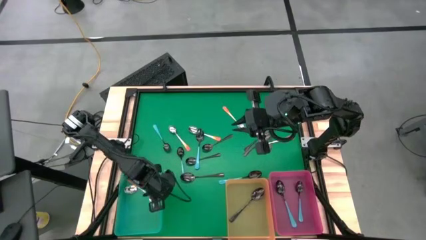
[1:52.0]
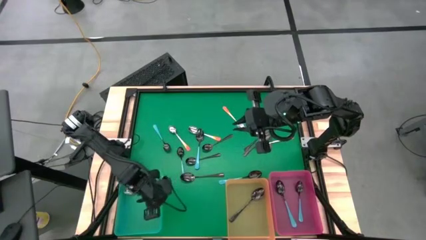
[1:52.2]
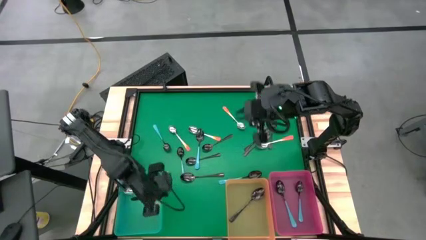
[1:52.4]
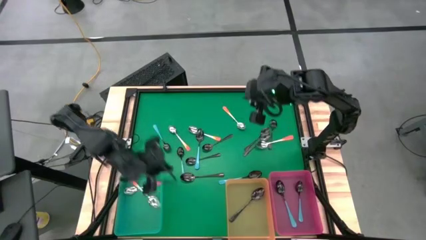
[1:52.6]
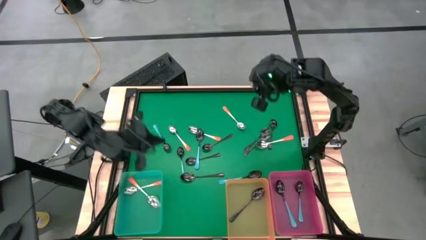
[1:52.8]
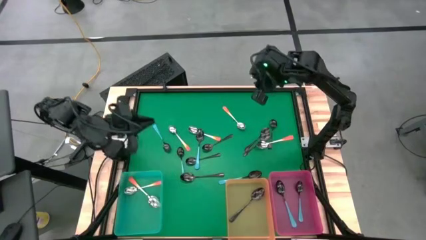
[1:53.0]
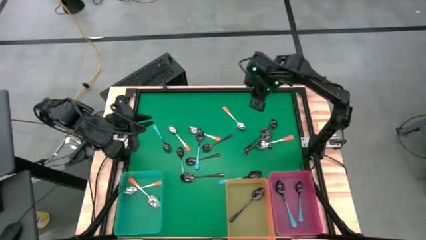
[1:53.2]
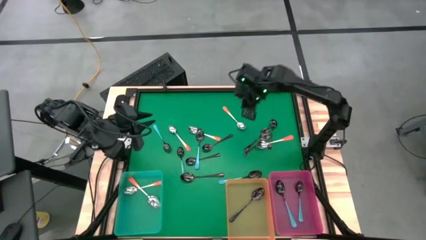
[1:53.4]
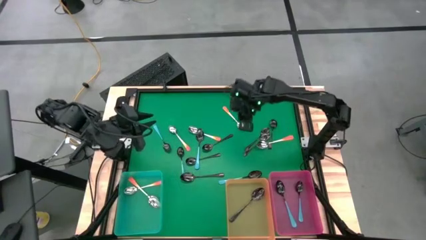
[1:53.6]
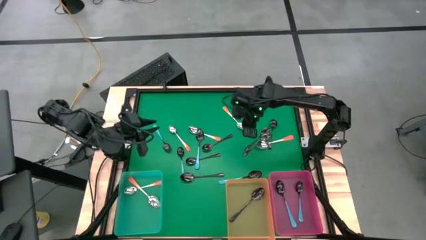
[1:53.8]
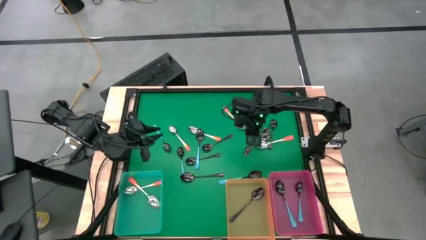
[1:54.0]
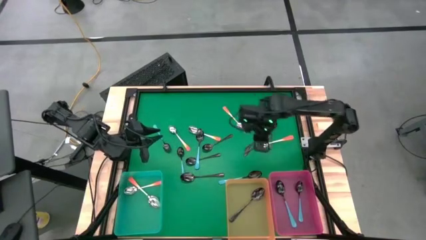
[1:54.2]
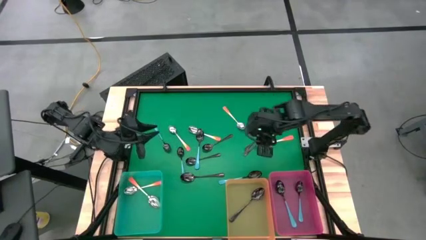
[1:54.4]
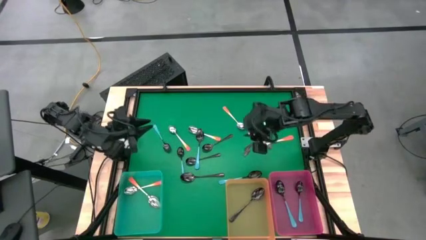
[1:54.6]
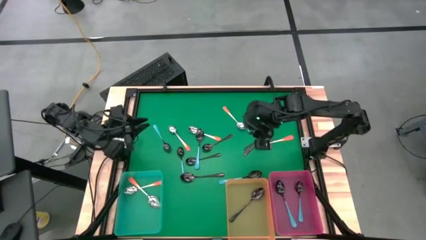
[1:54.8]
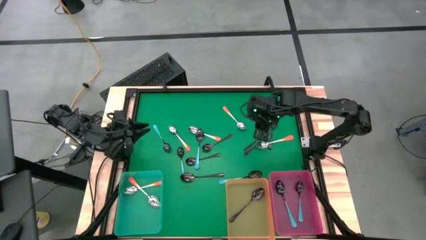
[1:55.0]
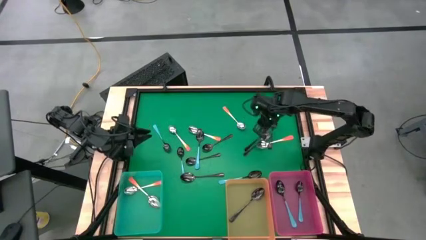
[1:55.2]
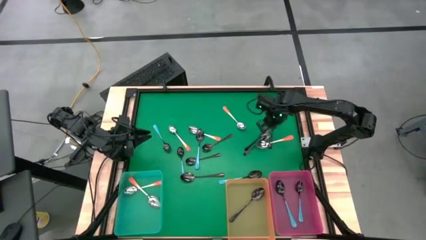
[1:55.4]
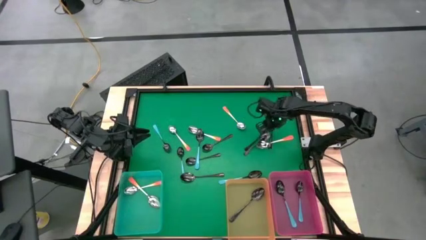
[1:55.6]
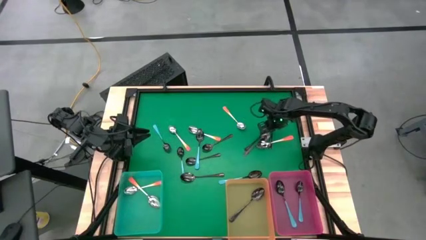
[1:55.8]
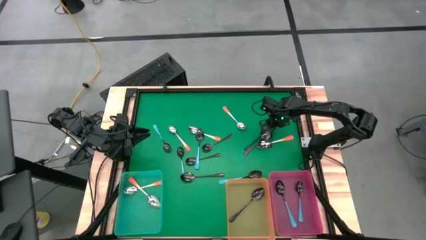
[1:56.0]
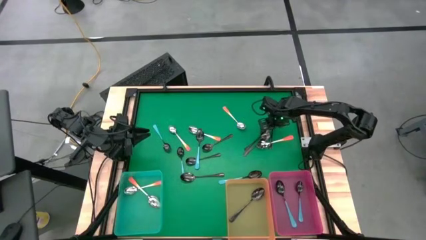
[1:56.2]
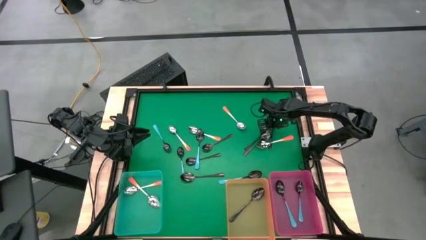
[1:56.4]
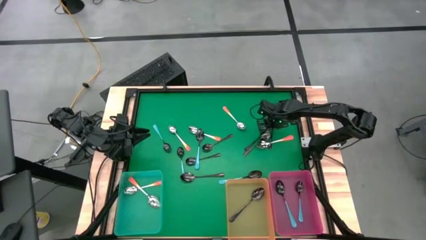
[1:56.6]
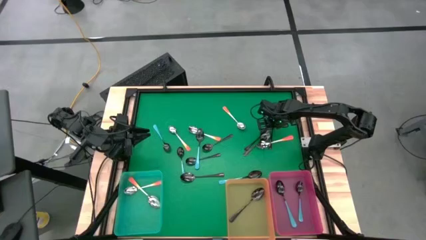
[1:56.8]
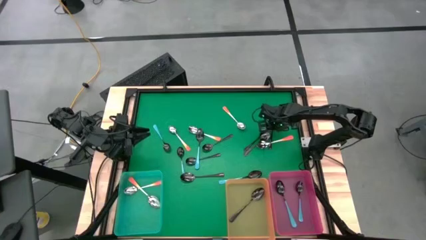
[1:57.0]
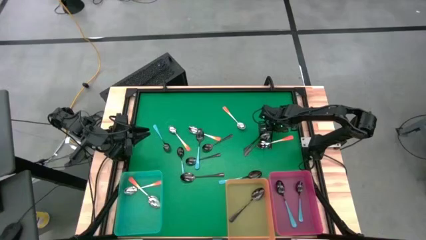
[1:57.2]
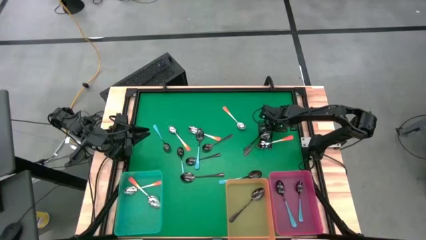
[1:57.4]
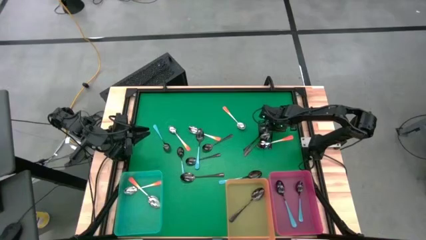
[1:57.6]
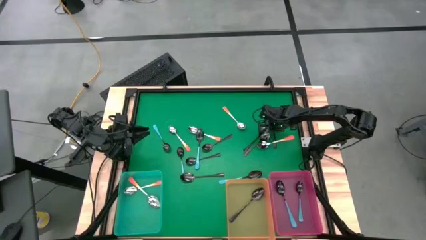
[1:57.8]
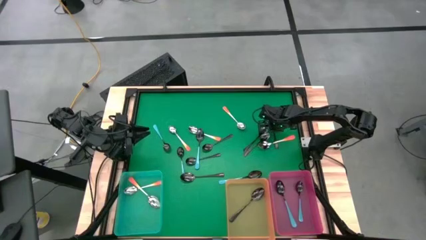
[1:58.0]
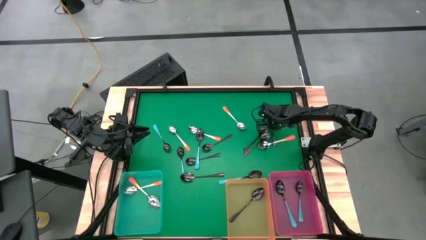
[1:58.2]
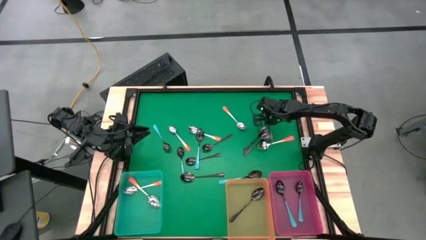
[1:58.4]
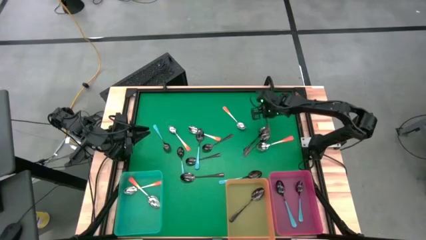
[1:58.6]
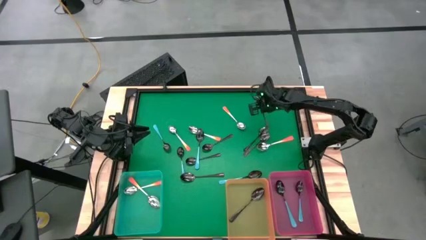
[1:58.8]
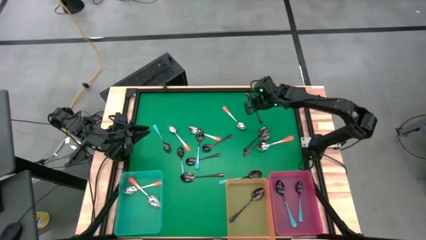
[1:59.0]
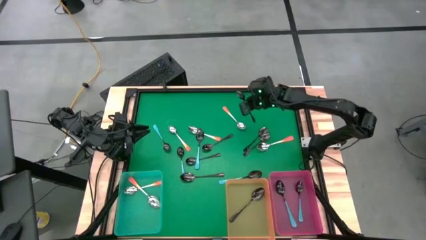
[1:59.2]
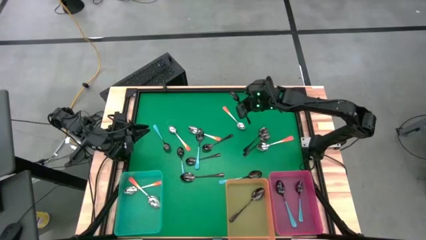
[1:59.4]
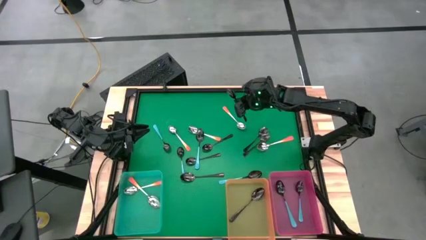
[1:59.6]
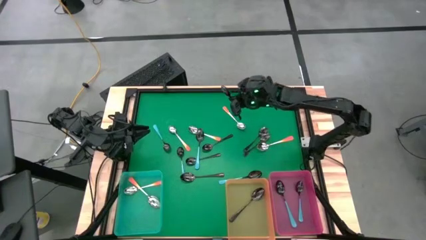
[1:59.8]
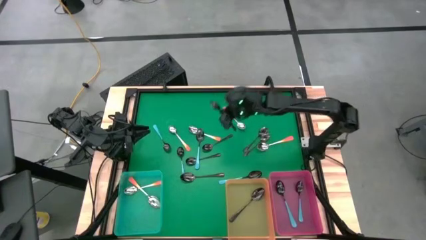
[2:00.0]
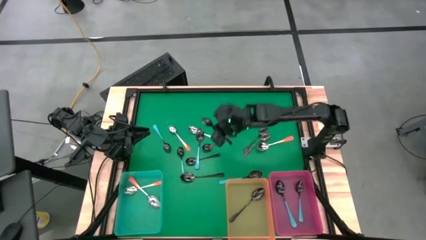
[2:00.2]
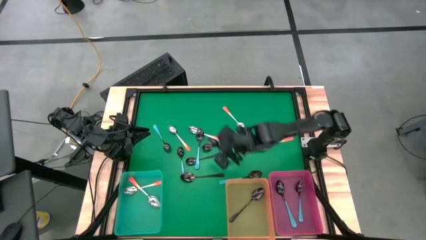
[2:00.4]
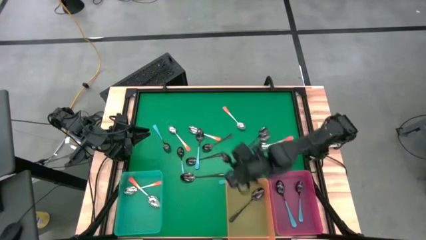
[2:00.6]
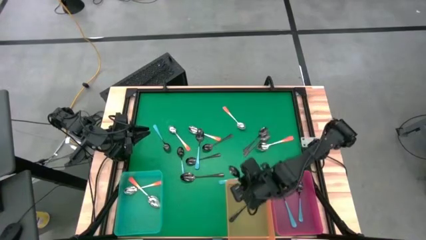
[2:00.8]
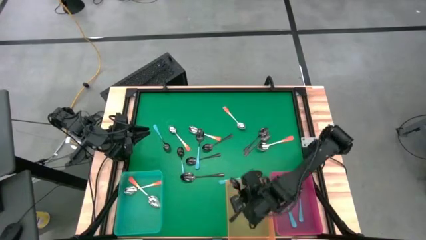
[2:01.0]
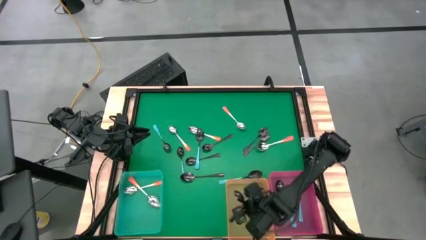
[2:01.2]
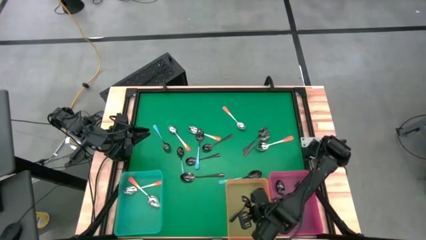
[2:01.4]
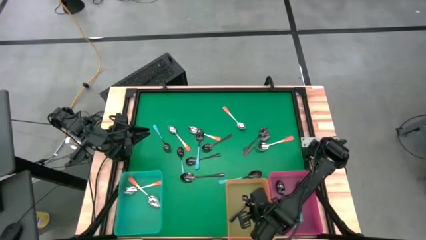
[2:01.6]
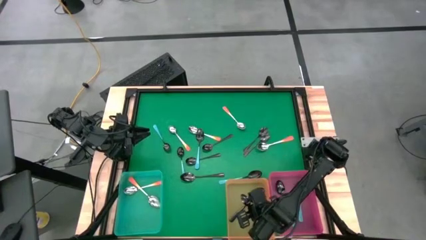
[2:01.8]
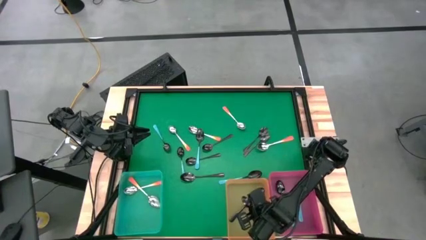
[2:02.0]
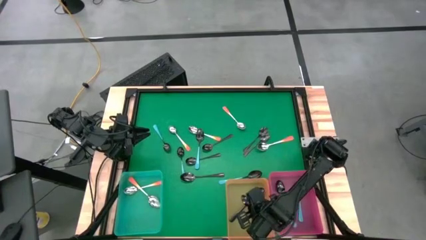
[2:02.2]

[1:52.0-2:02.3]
Task: Sort silverware by color (type)
Put the black spoon into the orange bin
